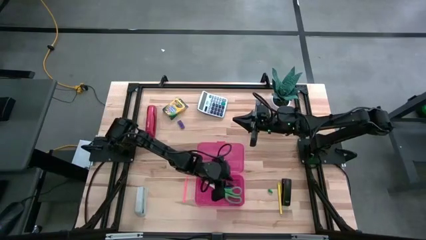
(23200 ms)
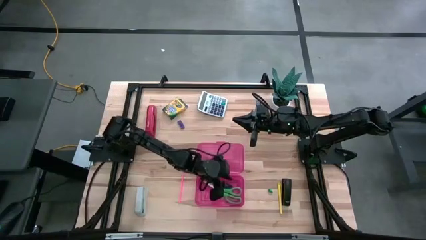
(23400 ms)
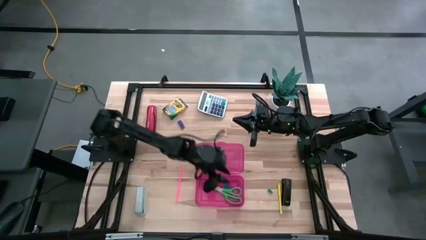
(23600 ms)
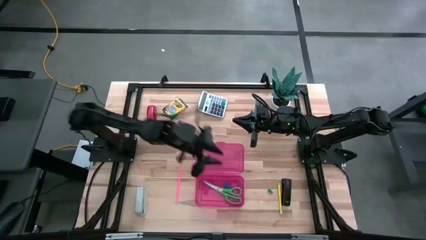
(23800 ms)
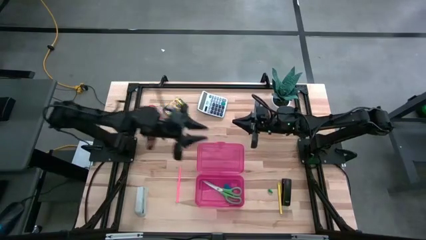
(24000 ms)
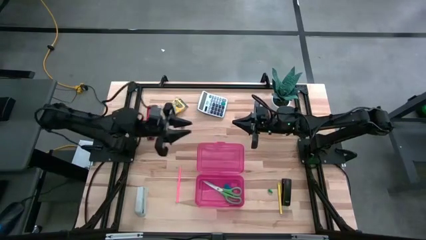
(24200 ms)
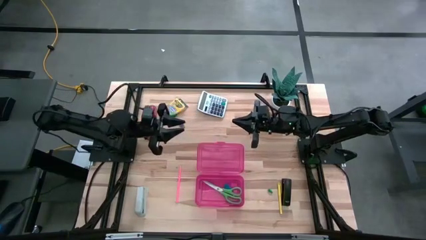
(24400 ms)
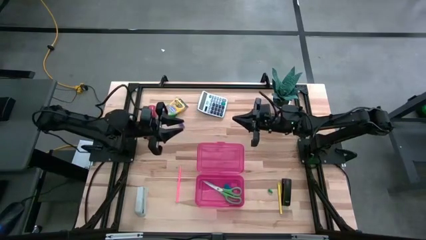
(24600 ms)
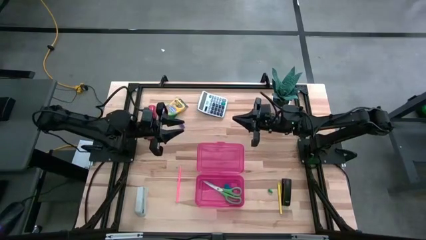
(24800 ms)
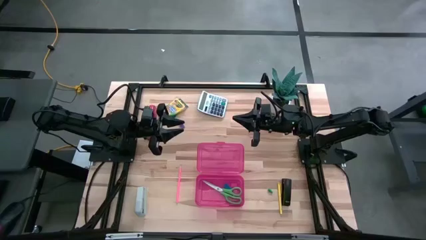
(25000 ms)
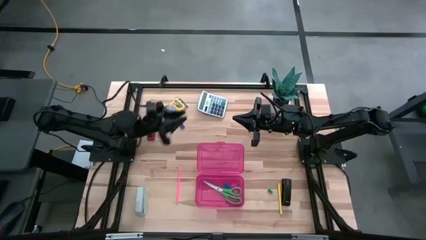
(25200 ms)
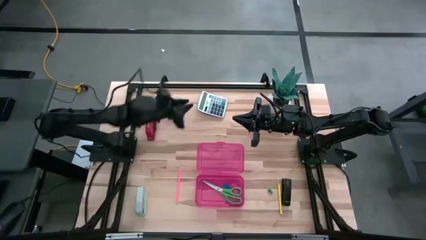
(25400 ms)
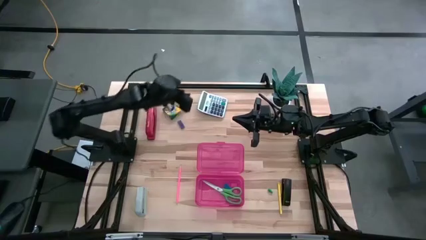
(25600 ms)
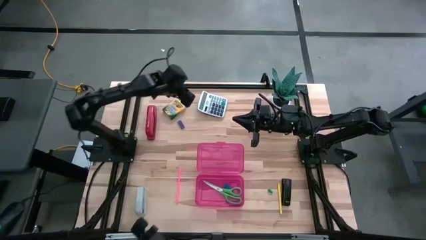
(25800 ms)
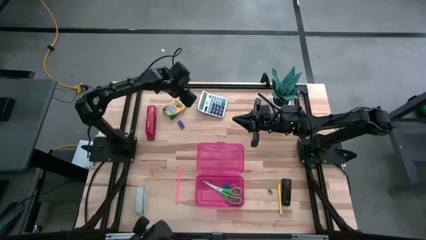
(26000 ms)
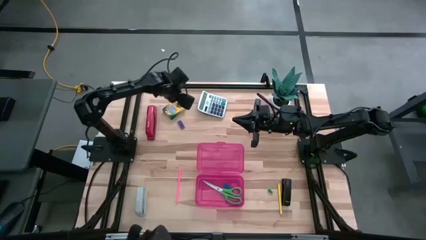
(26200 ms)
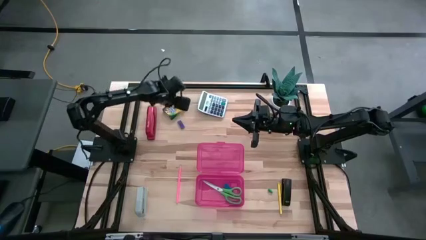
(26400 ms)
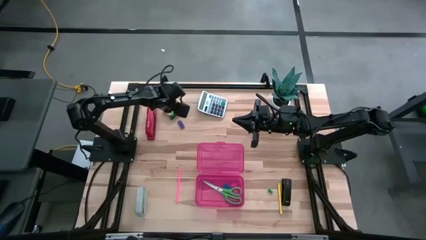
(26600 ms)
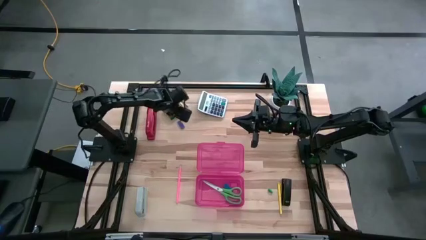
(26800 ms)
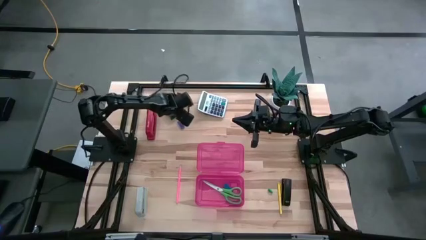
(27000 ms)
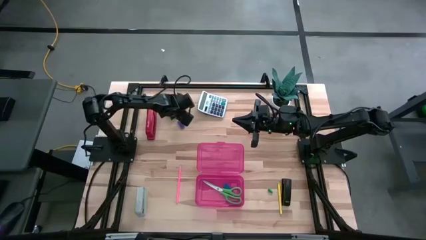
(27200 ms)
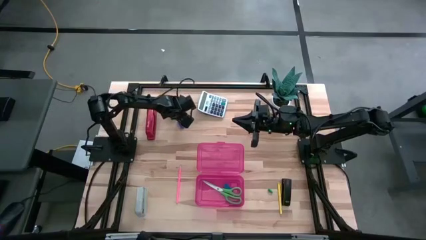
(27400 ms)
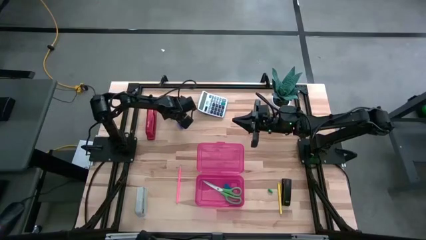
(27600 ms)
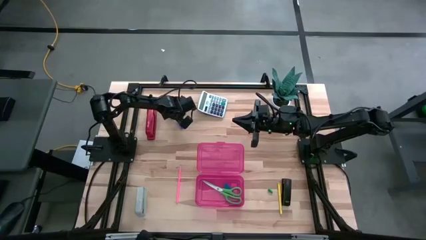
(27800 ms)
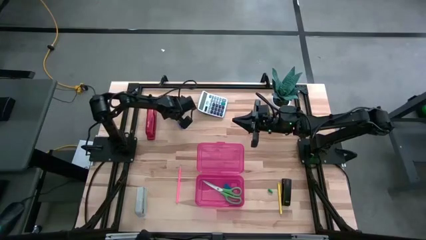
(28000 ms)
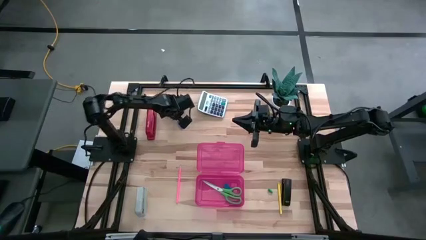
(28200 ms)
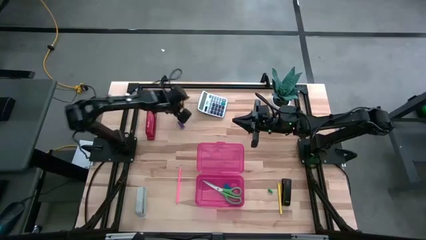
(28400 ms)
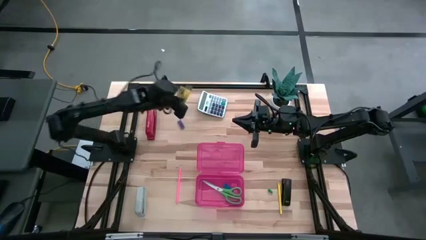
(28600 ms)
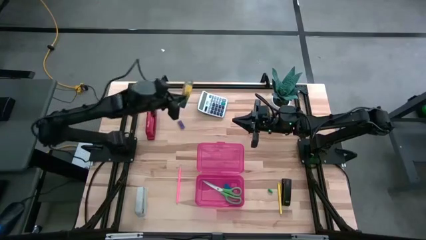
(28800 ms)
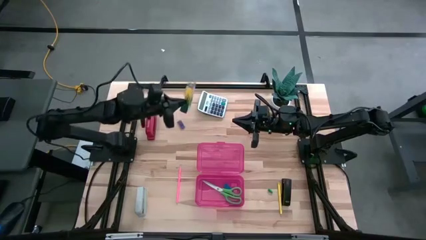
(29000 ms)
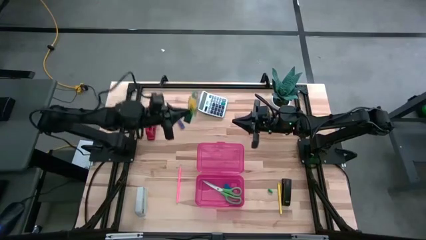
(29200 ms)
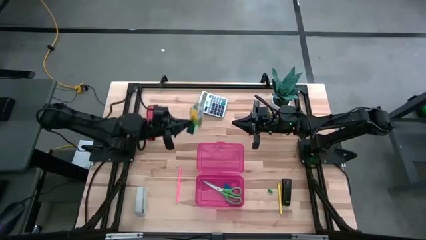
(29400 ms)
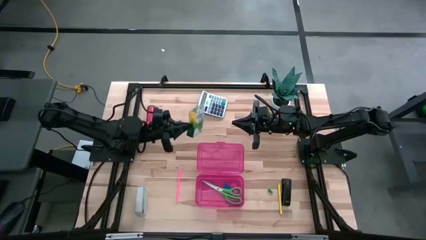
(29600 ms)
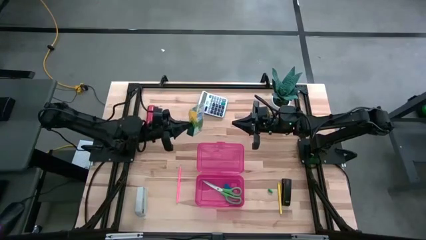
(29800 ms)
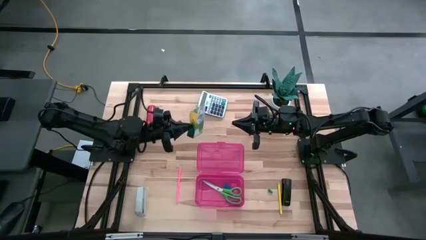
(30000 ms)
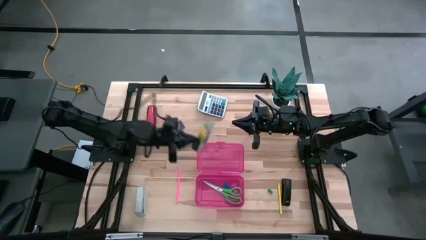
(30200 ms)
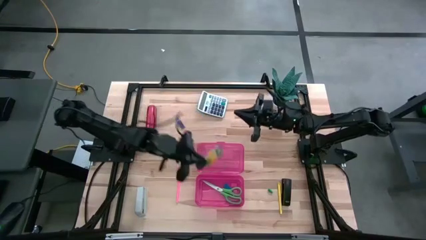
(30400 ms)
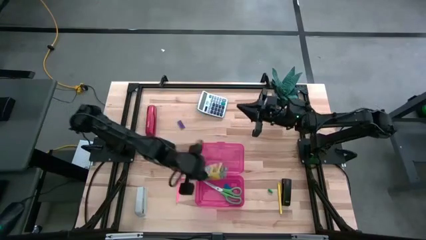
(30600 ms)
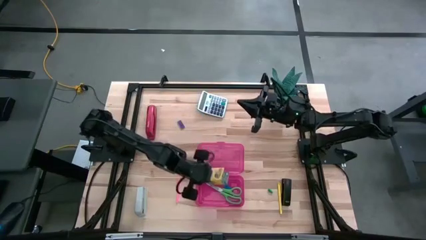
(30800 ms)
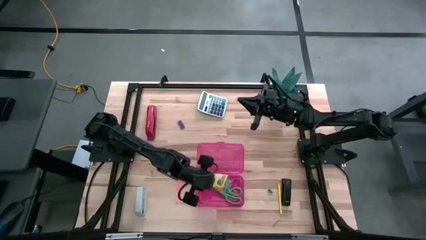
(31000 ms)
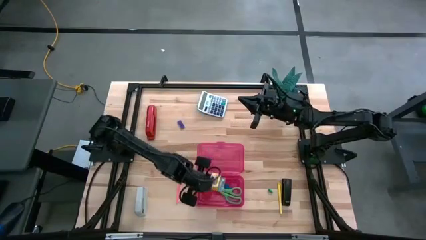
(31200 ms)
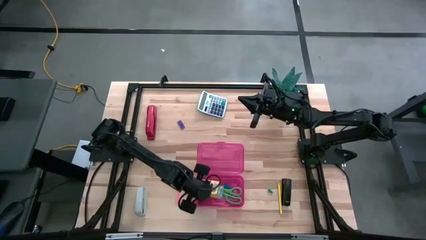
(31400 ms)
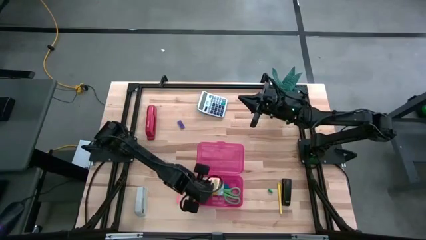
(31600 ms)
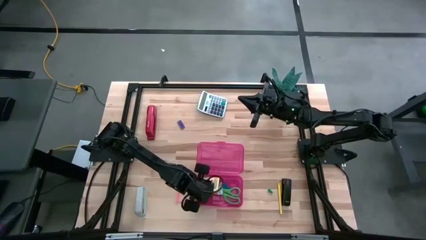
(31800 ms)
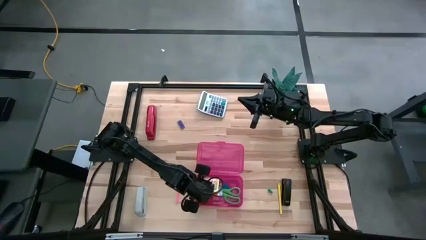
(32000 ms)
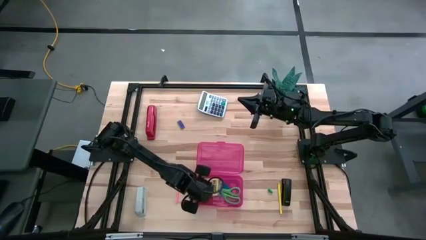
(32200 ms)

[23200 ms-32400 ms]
Task: Pack school essentials
Put the yellow crayon box into the pink supply box

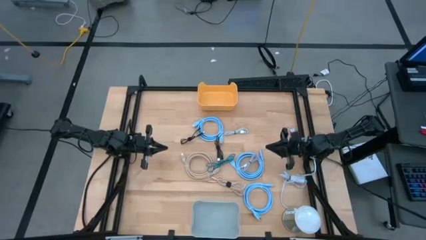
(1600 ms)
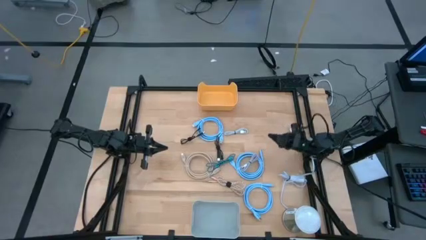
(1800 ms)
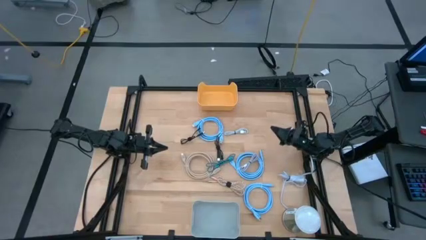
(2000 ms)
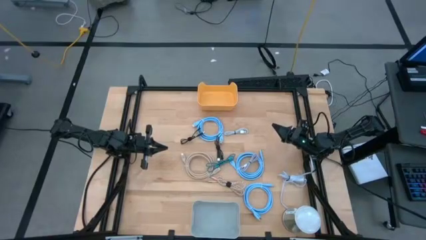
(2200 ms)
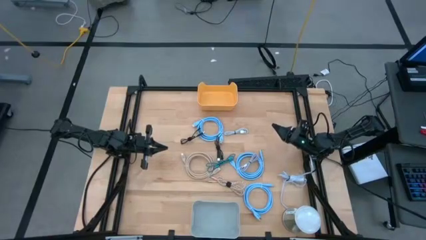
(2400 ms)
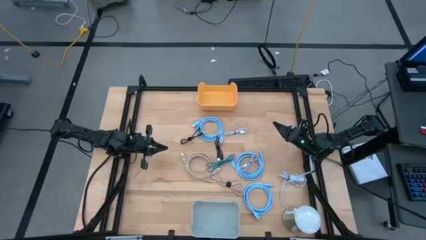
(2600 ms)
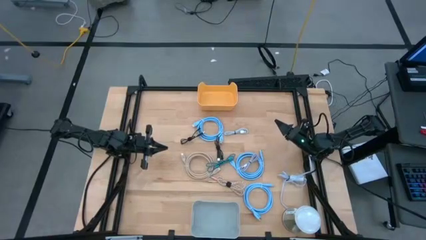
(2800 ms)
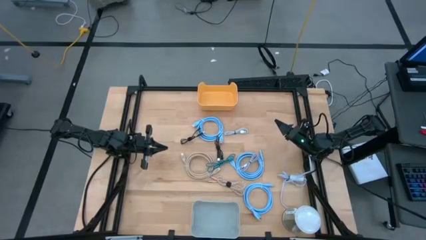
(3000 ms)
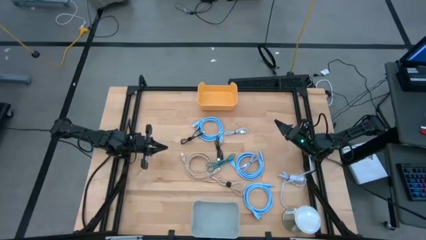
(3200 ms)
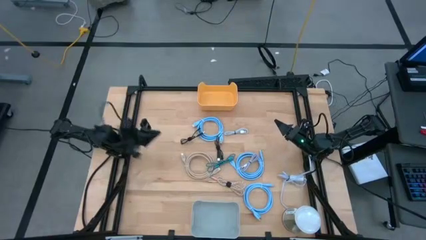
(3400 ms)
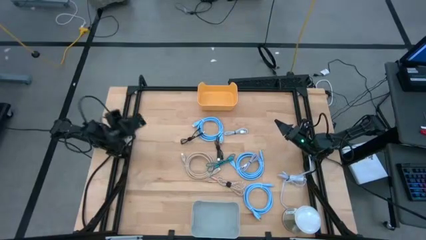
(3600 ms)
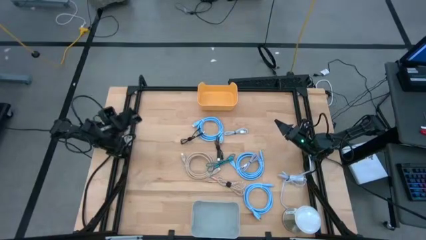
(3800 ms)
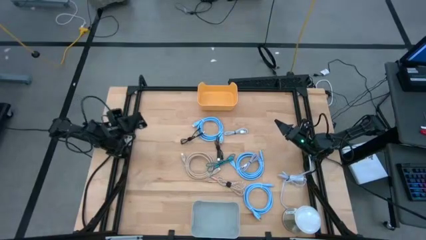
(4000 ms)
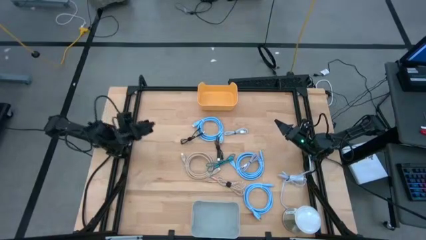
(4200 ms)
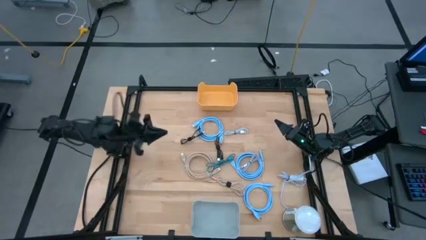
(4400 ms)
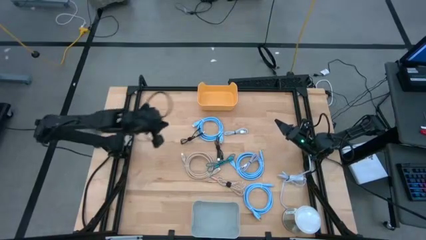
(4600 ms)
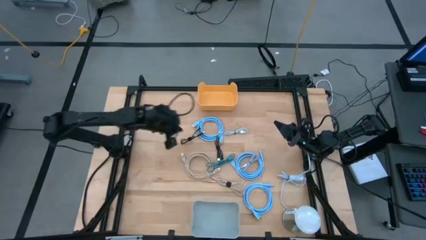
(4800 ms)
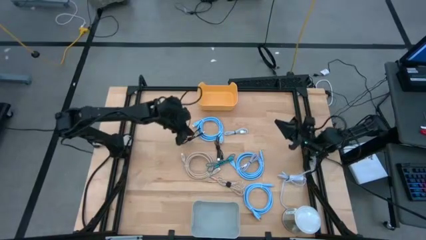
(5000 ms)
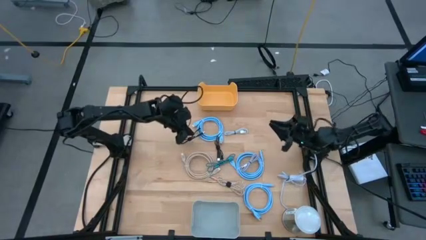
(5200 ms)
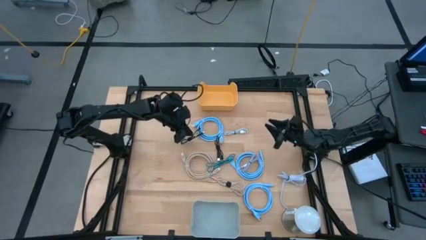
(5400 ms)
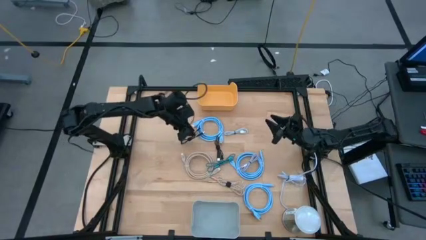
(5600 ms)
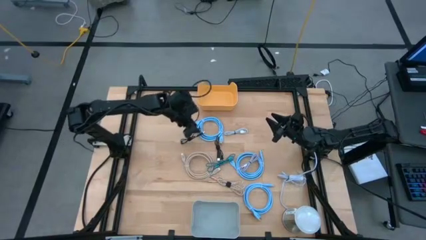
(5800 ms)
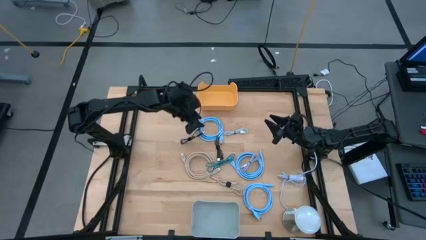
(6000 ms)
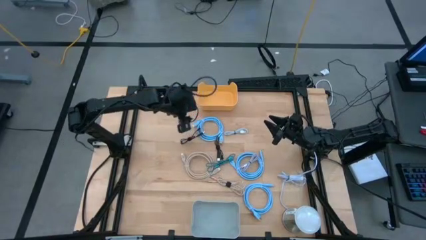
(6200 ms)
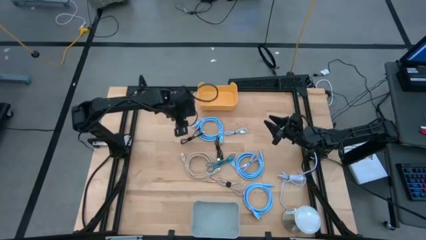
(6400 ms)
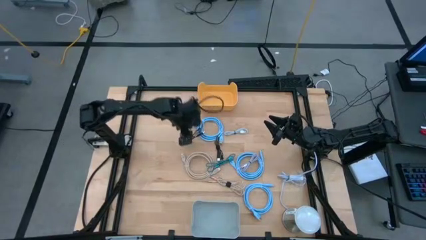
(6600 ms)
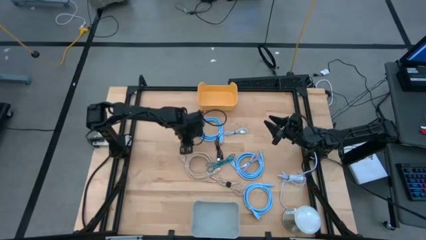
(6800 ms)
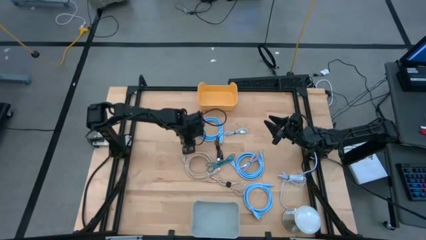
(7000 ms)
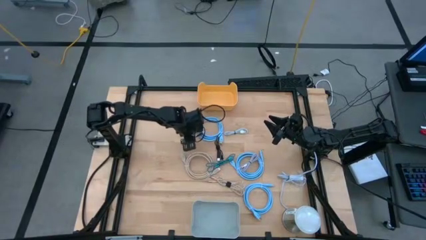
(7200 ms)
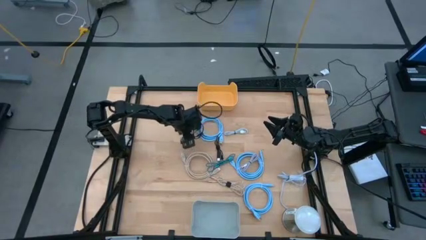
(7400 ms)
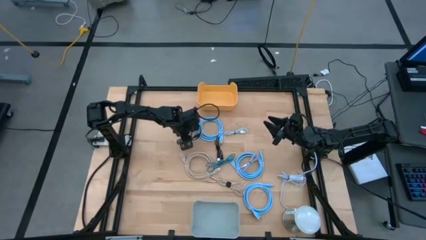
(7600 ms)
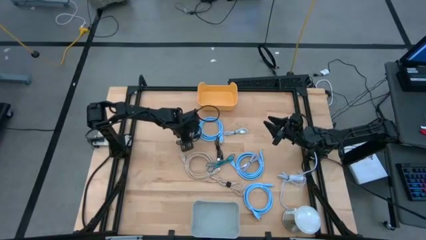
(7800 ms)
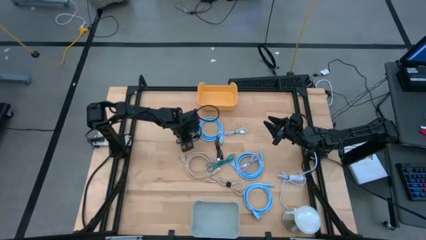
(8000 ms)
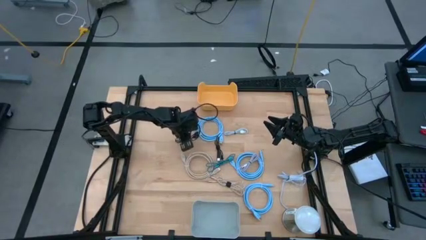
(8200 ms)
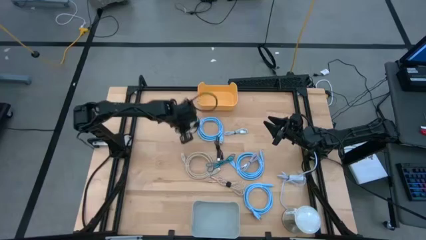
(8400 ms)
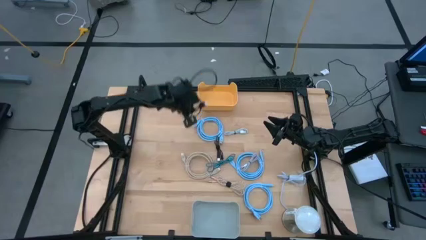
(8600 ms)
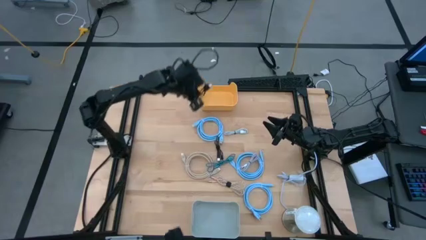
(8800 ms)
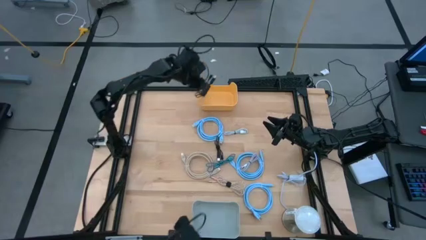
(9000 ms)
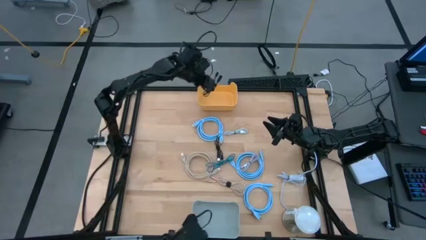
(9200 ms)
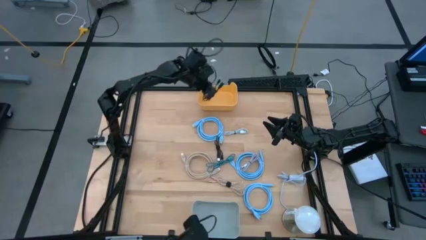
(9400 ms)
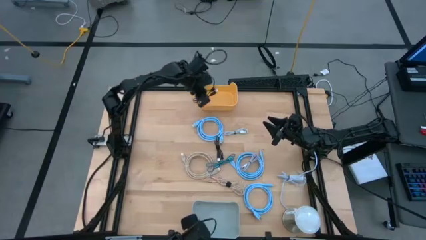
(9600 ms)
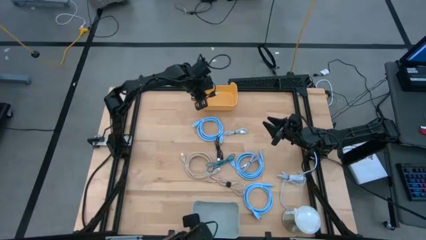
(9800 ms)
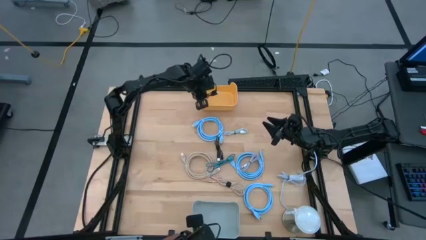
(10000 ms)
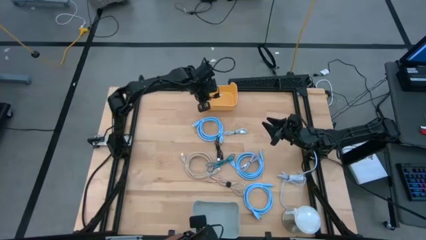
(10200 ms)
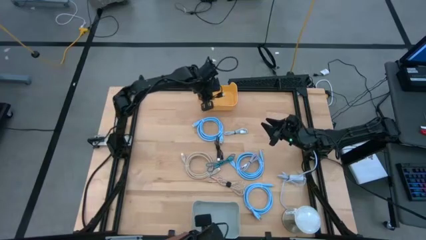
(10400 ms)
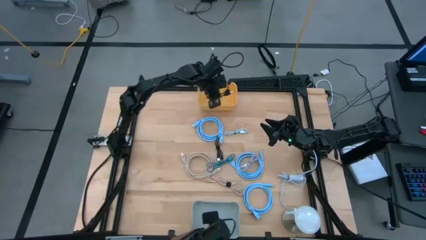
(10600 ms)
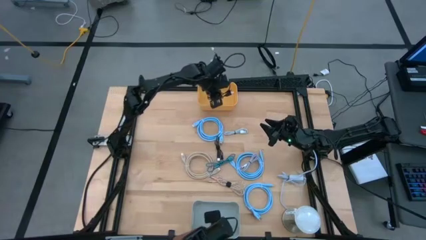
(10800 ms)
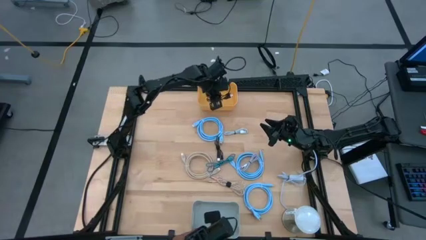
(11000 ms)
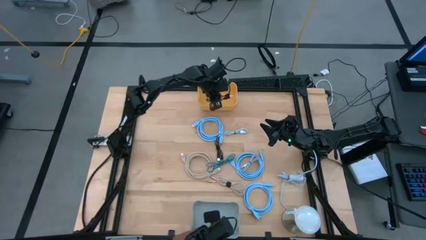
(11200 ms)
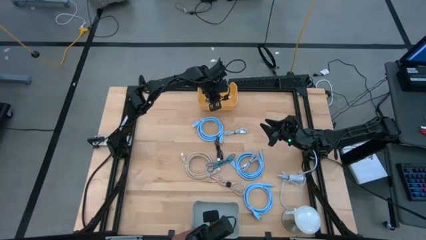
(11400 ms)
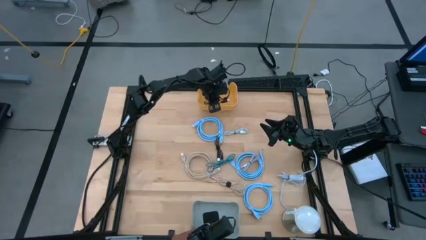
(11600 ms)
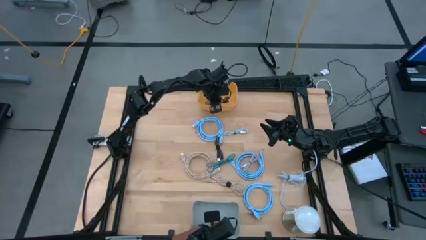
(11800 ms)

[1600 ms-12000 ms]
Task: Sort cables into bins
Put the black charger cable into the yellow bin
